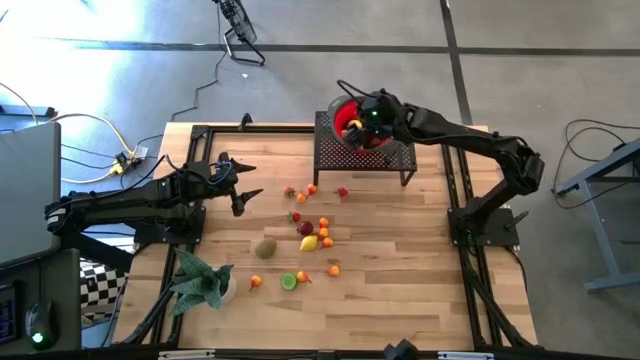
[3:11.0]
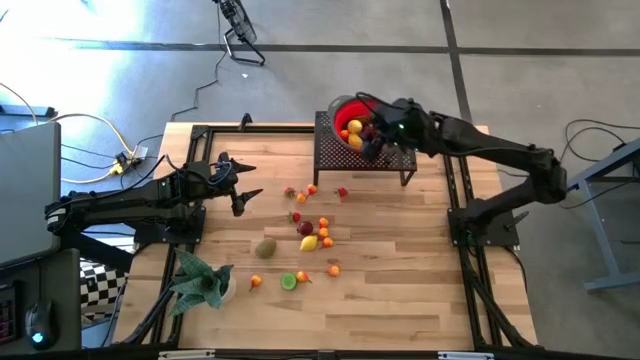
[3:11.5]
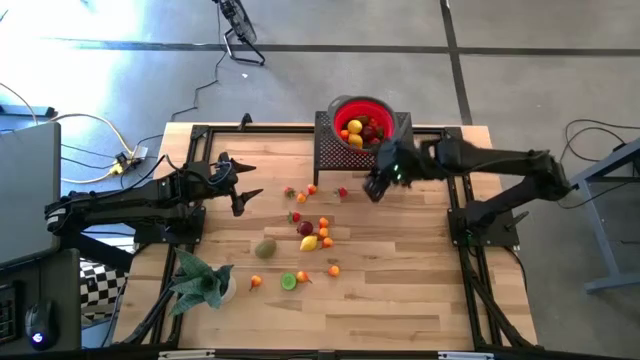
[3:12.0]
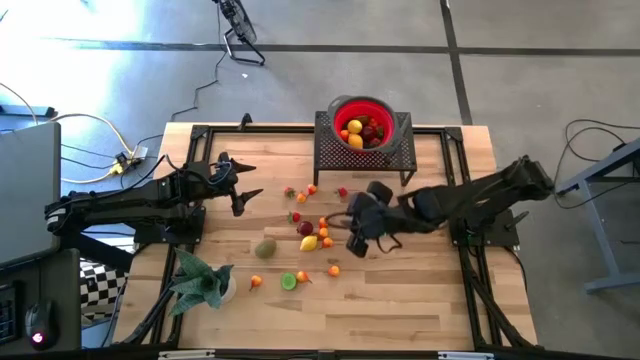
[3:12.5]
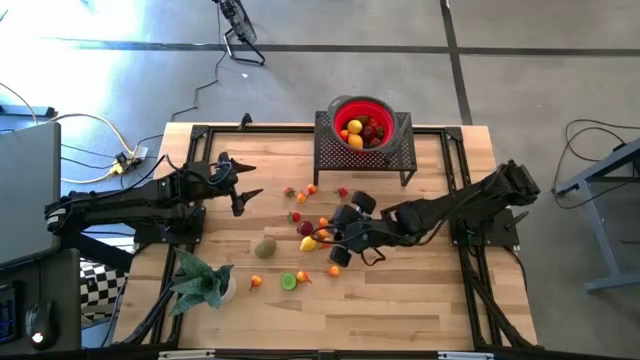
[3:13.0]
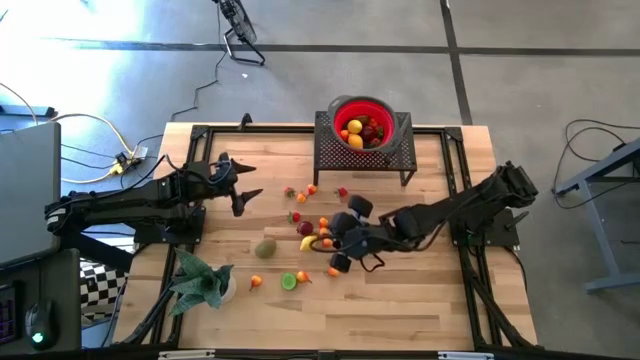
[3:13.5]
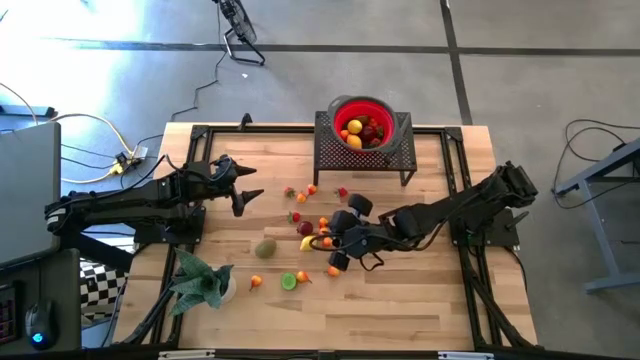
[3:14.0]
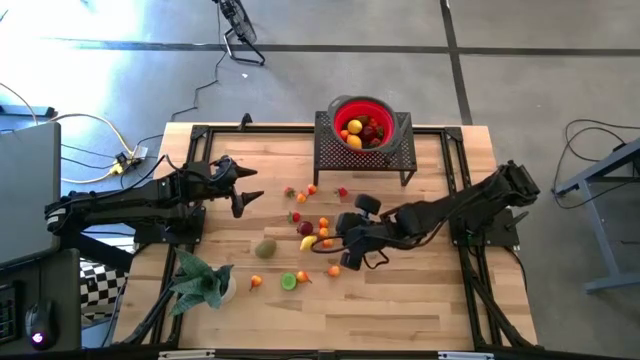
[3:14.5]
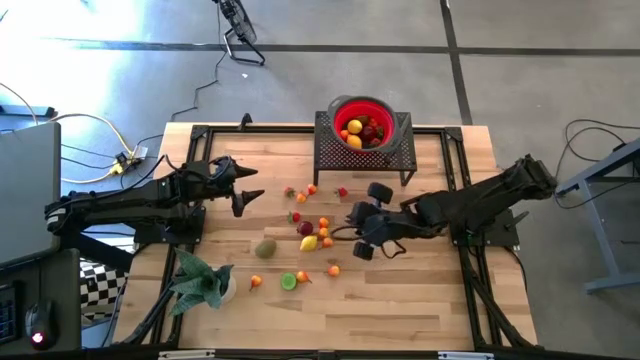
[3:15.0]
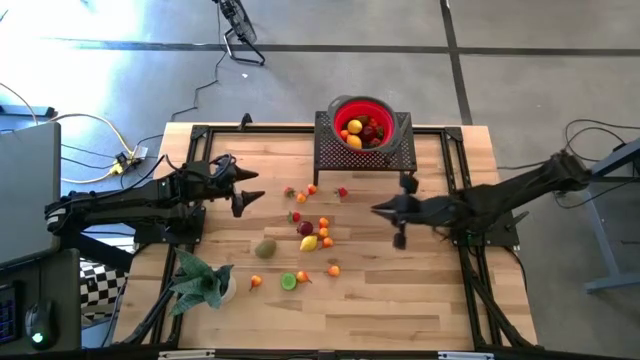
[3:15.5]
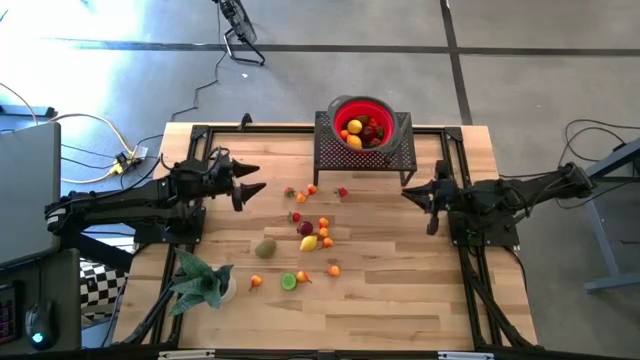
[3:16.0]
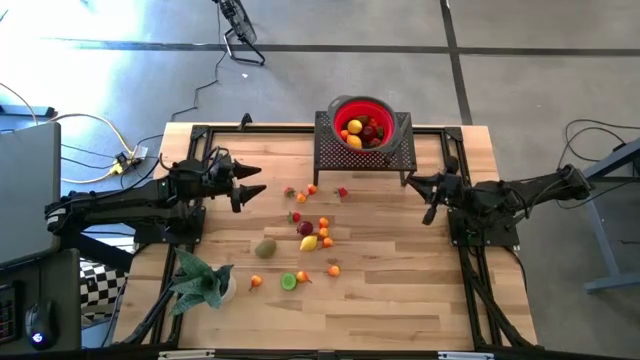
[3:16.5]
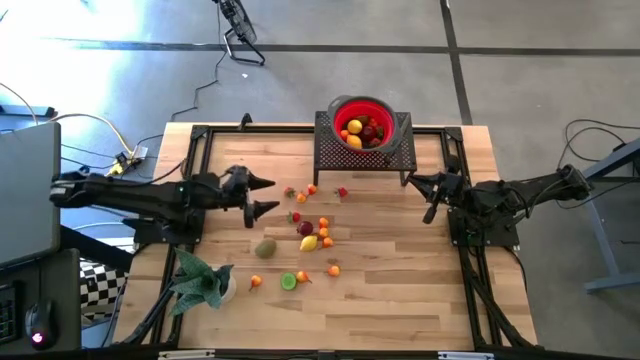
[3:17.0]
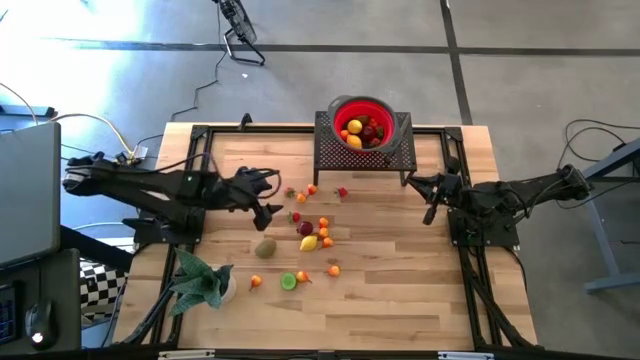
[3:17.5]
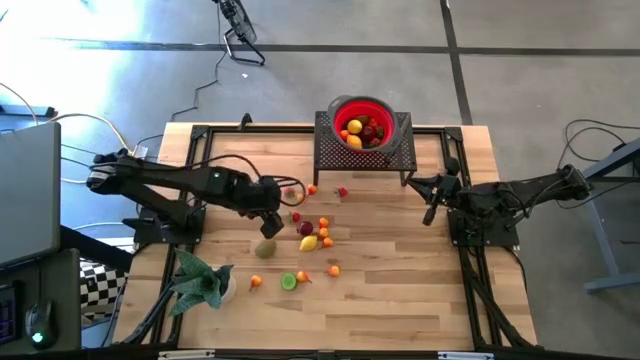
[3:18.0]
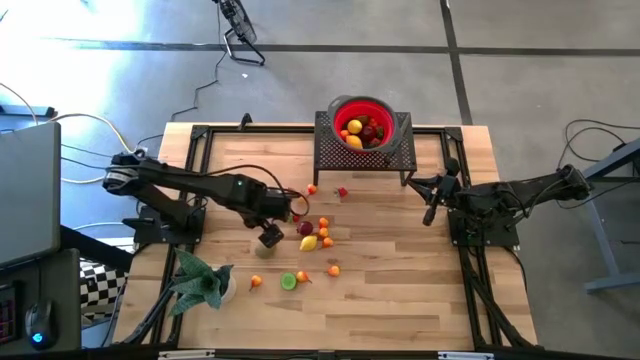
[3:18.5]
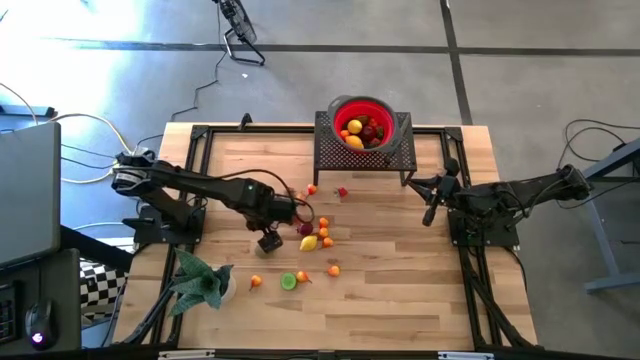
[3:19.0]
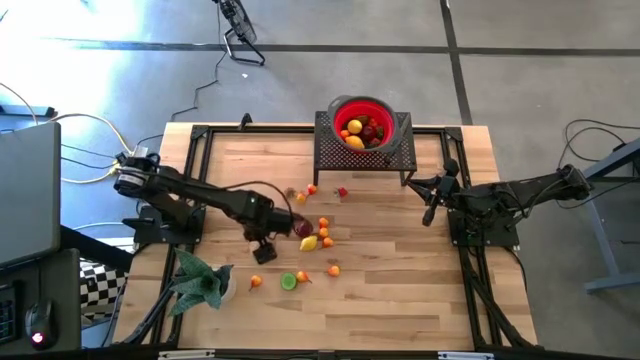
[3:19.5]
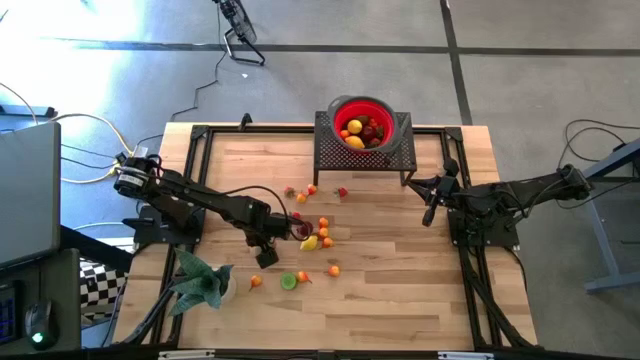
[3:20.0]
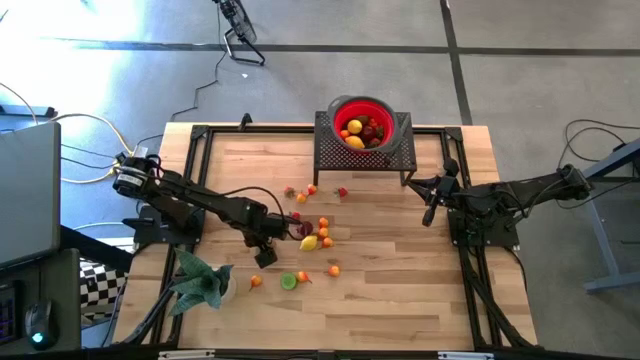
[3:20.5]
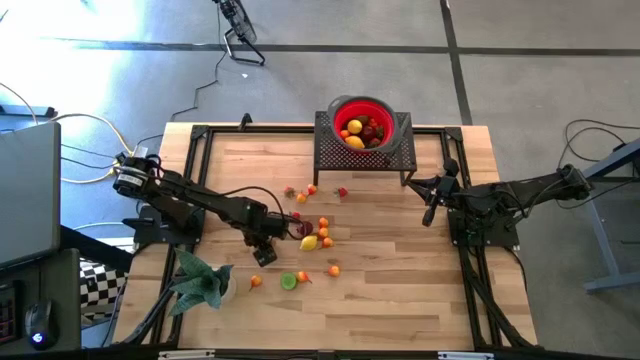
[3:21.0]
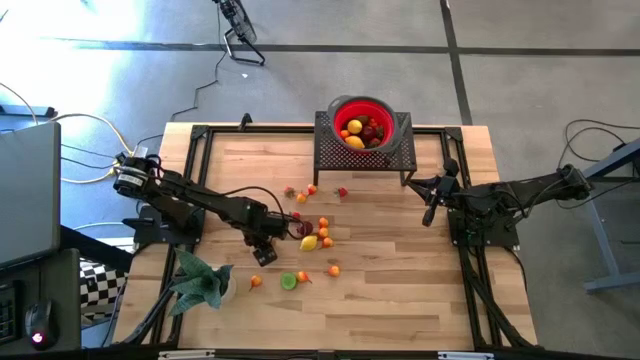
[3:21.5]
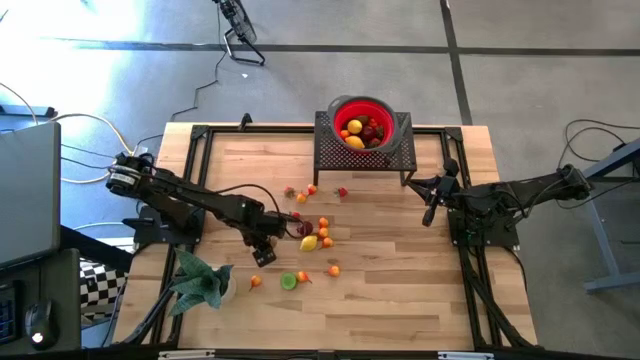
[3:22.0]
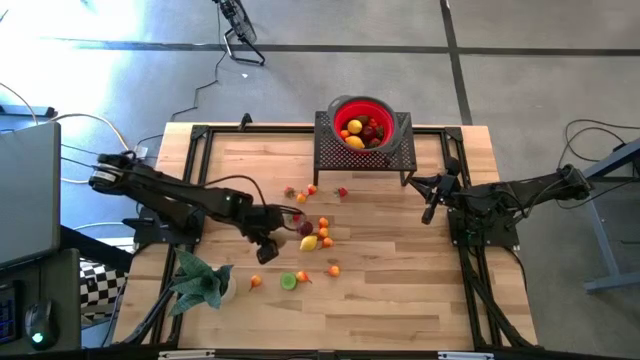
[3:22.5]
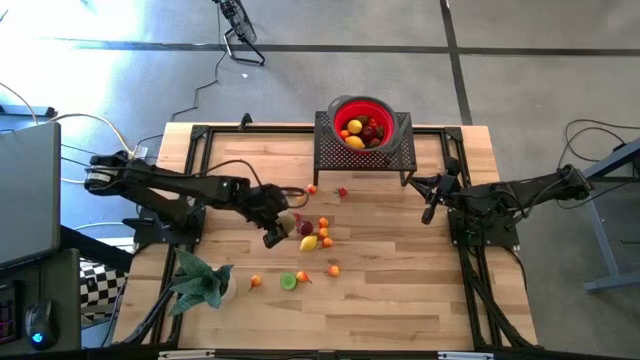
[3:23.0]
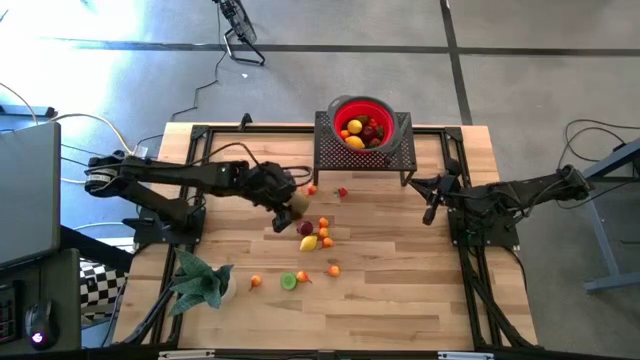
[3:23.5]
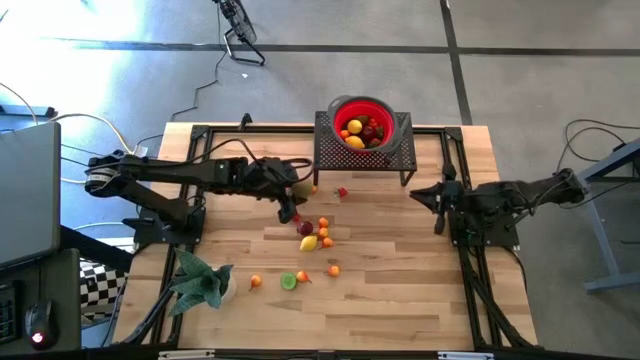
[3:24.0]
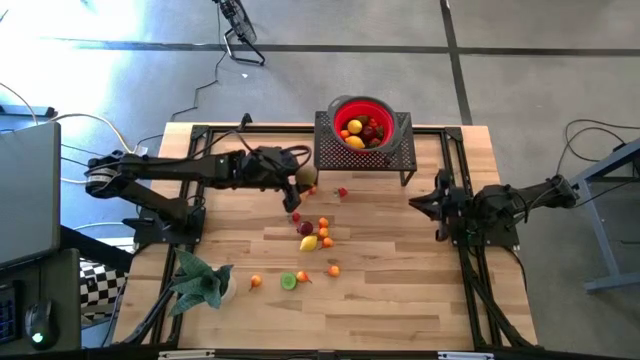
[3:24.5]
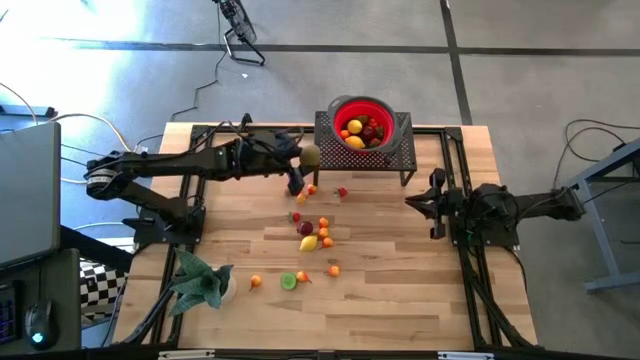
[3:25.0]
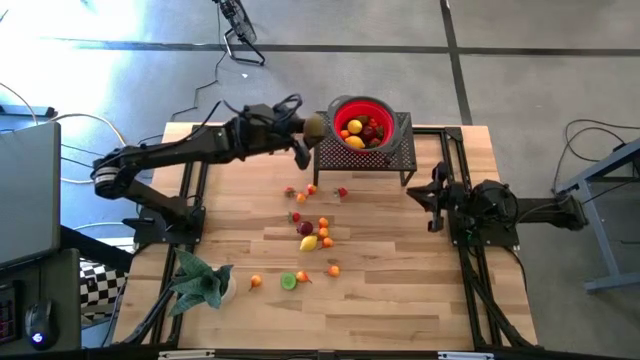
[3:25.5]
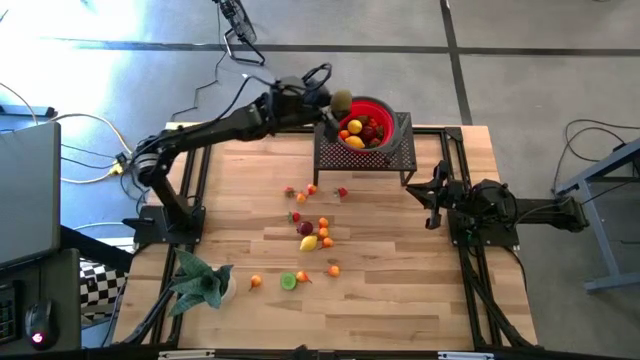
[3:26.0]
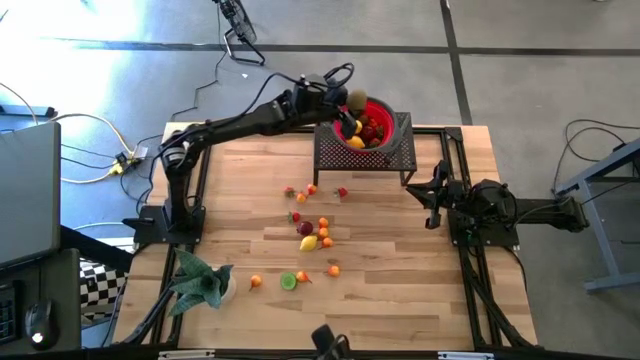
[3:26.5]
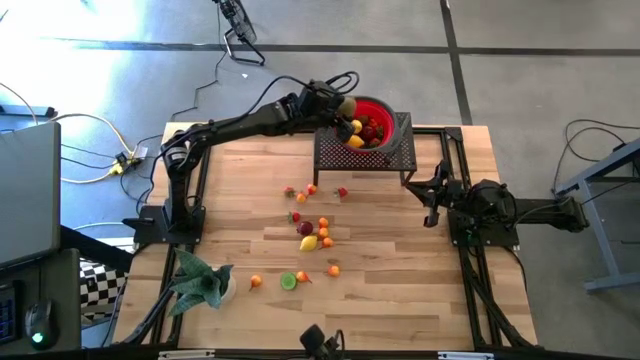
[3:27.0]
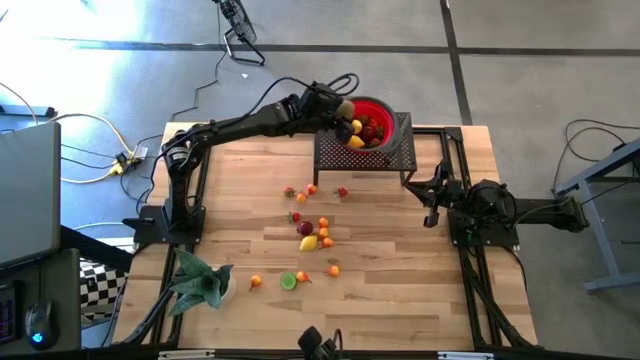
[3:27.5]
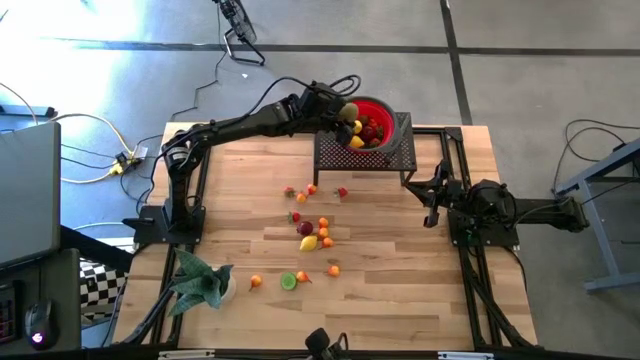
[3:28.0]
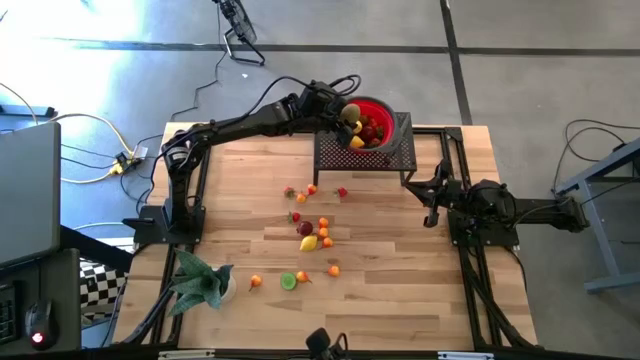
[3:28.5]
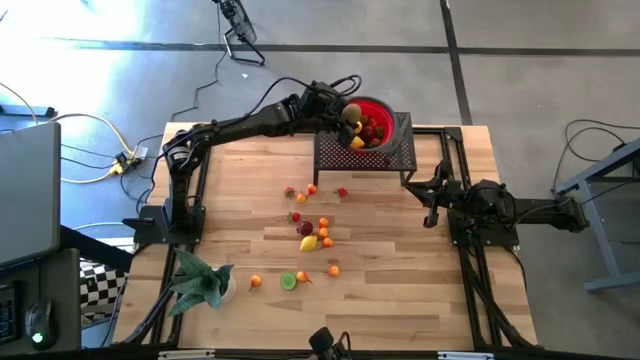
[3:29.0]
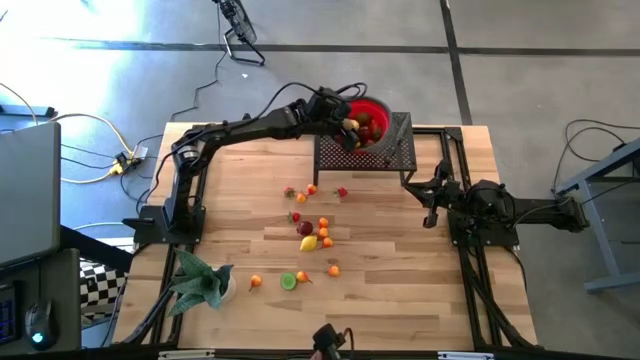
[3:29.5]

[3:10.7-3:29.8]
Task: Pick & Place Fruit
Put the kiwi into the strainer on the shelf

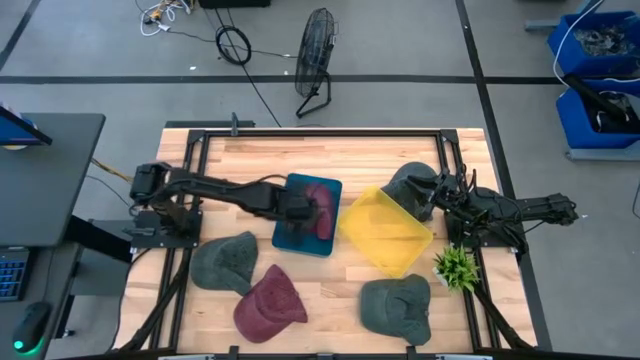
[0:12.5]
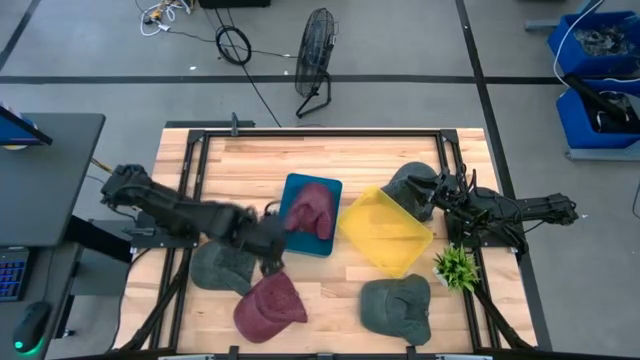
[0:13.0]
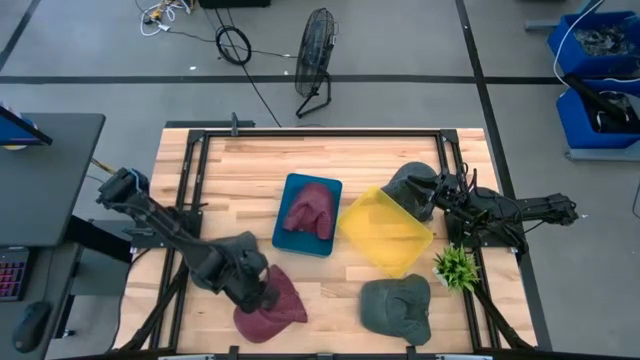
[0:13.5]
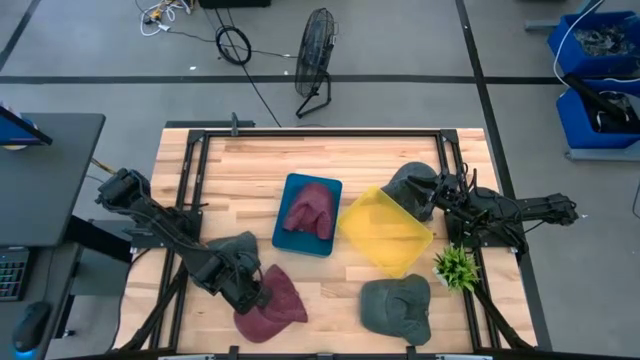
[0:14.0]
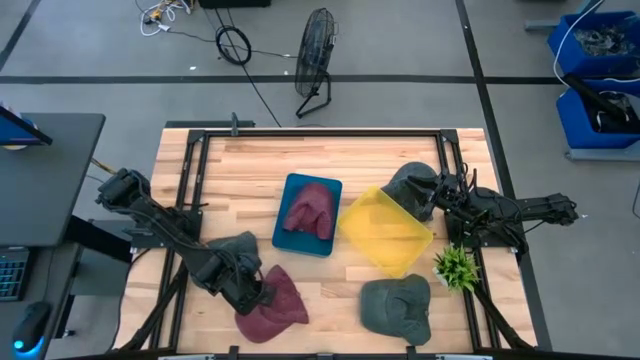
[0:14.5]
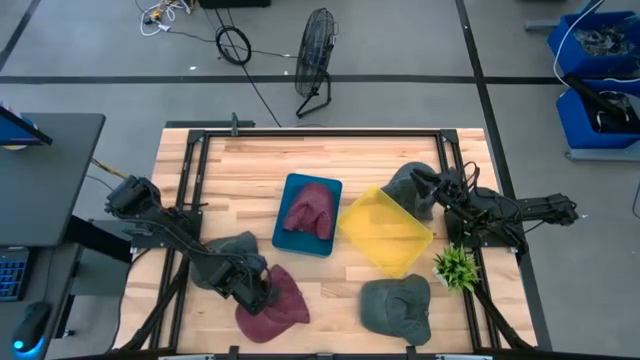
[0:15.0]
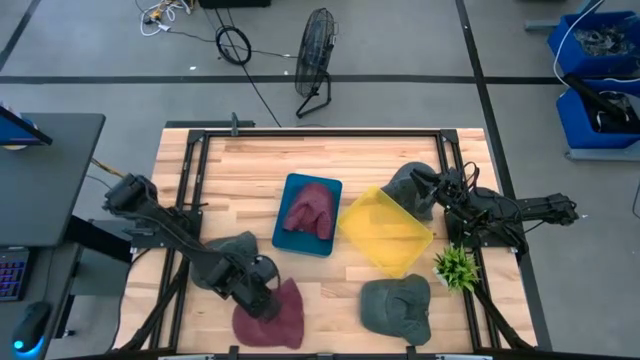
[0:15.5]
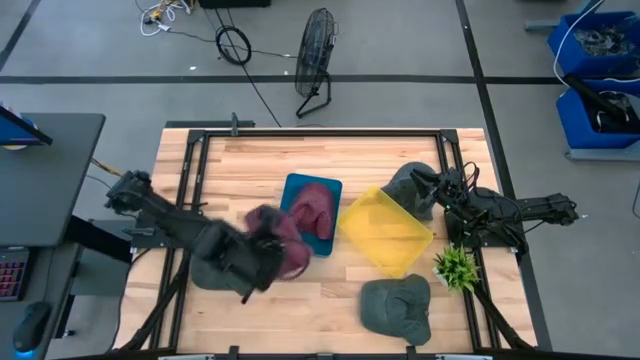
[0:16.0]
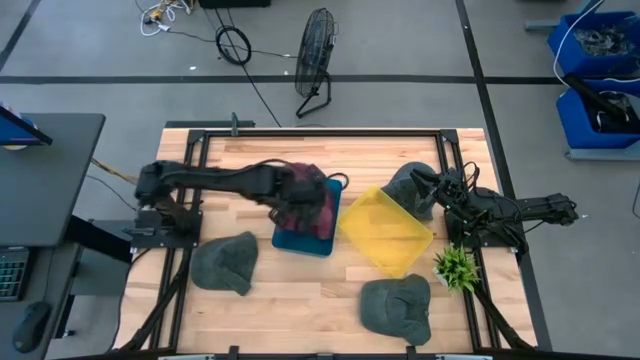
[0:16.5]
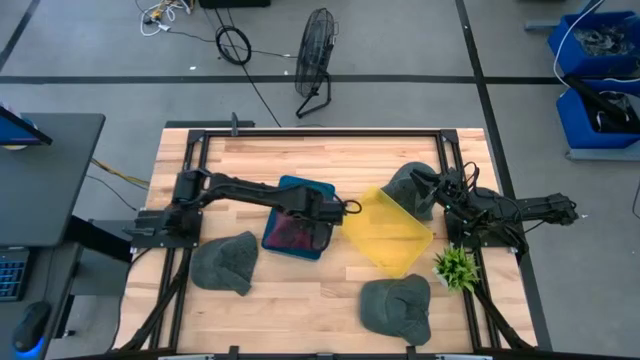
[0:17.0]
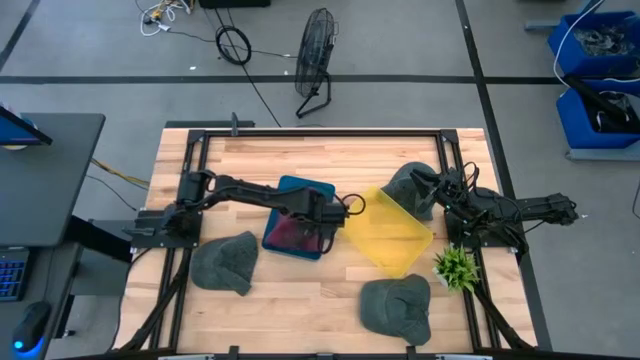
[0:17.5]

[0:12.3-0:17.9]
Task: Pick & Place hat
Put the red cap into the blue bin
